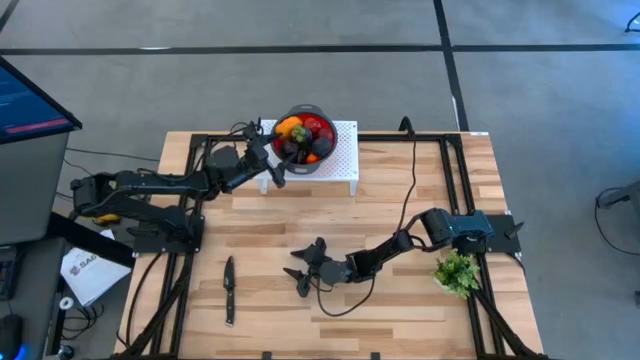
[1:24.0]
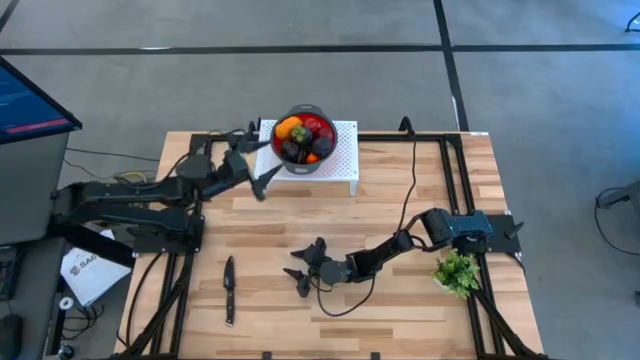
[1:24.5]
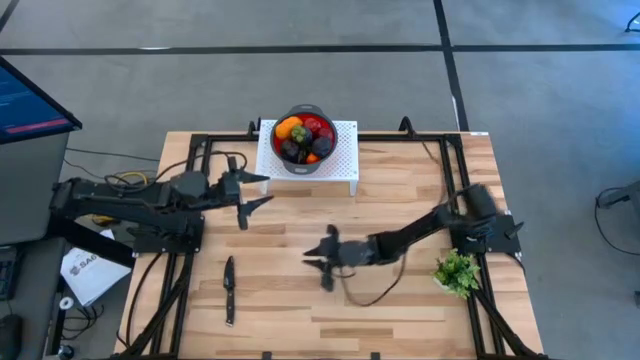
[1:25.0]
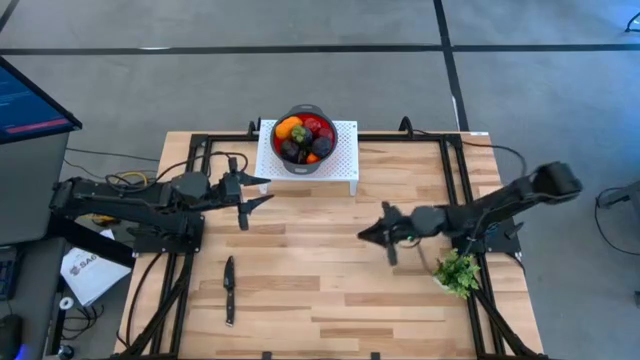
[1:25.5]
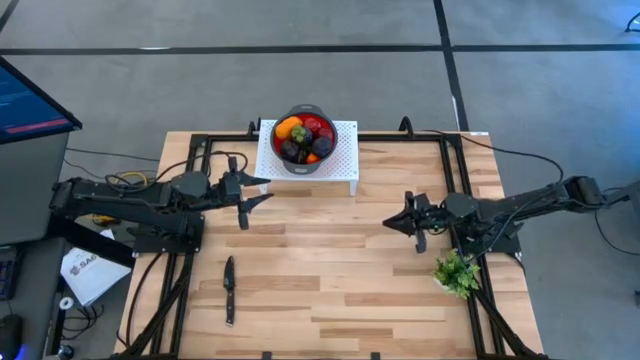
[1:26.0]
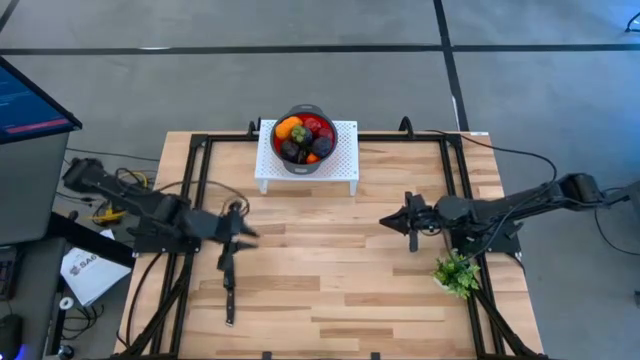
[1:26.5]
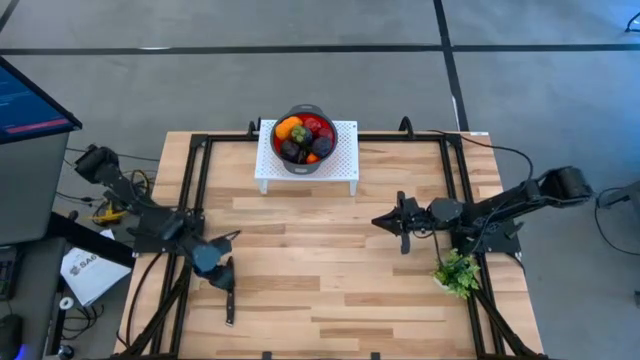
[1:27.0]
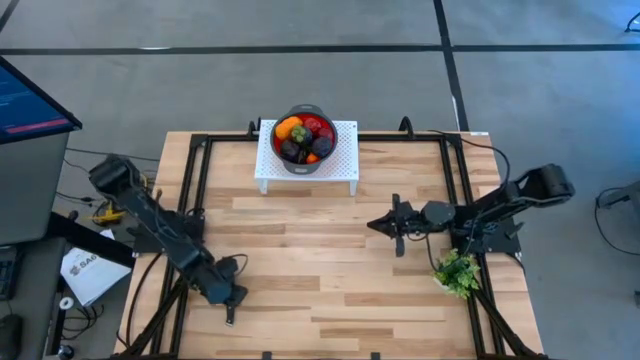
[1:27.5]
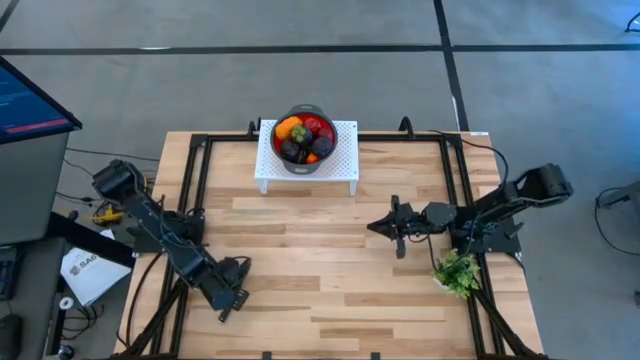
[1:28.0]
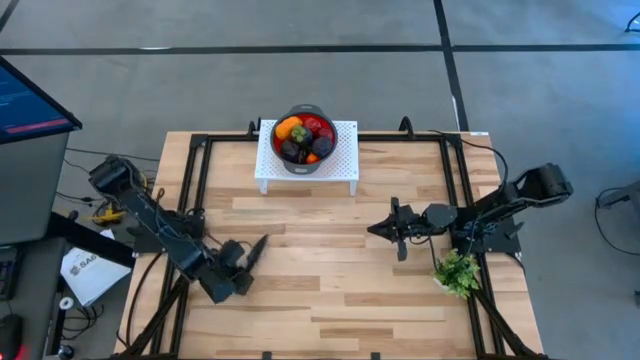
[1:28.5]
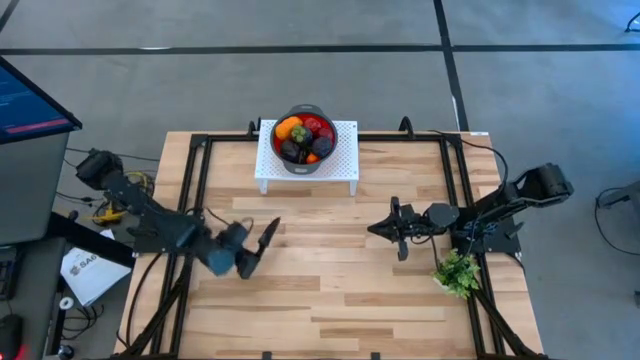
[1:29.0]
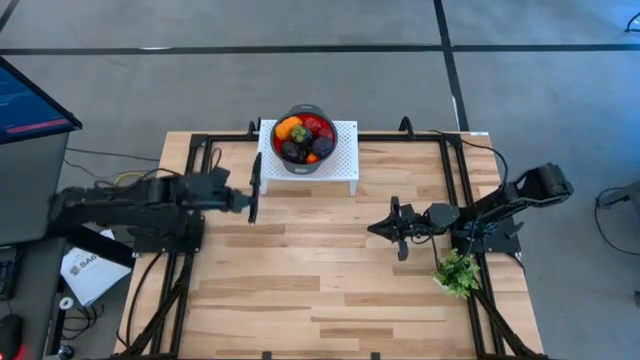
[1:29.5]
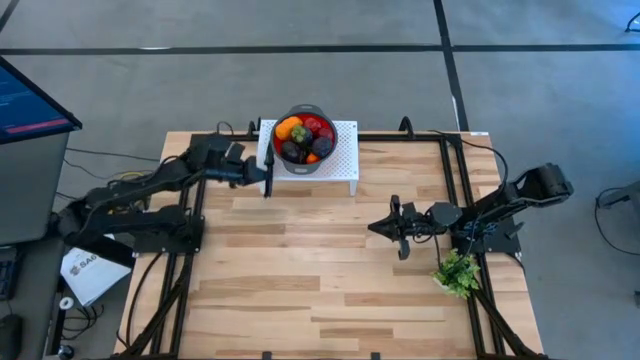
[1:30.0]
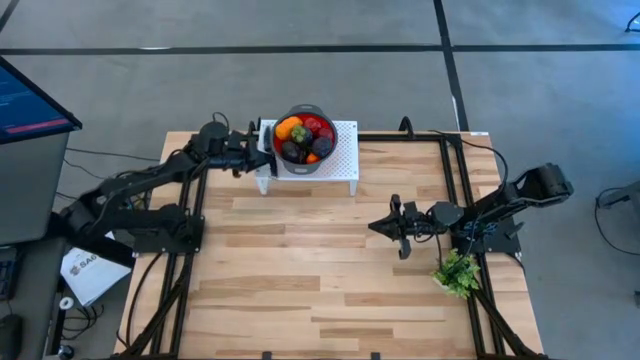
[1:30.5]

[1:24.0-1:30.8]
Task: Pick & Place Fruit
Put the knife on the shelf

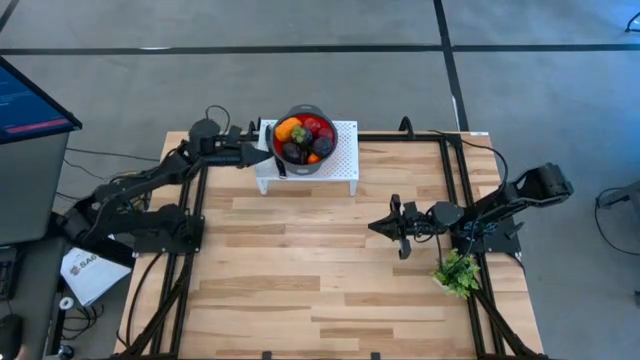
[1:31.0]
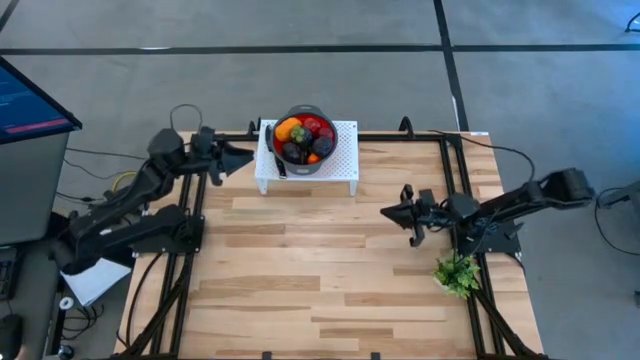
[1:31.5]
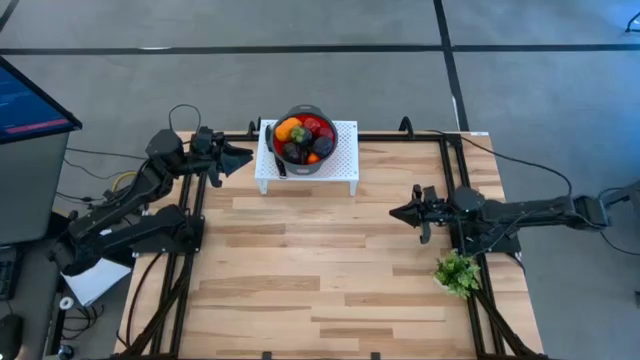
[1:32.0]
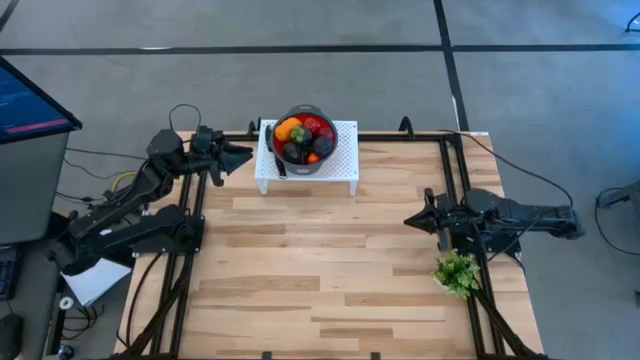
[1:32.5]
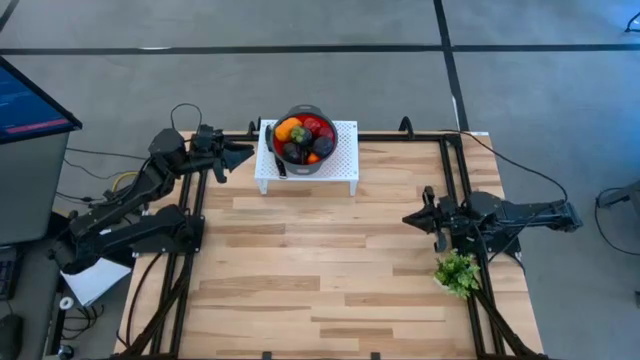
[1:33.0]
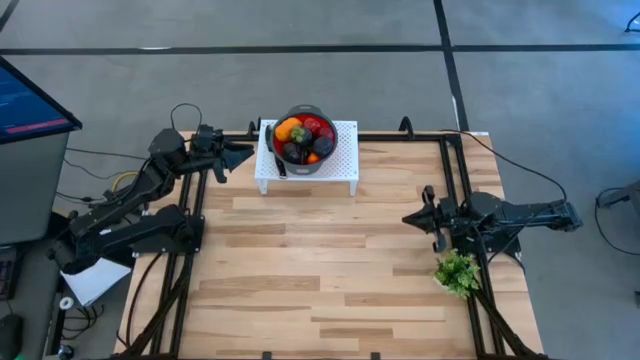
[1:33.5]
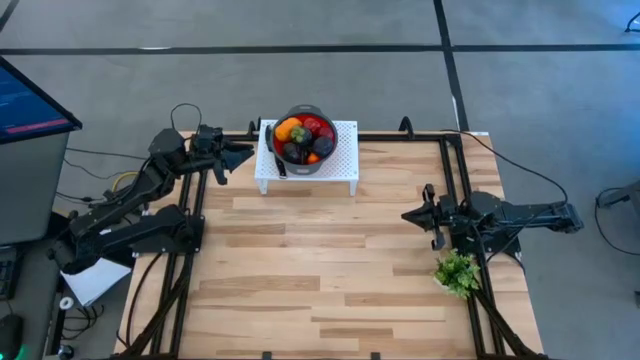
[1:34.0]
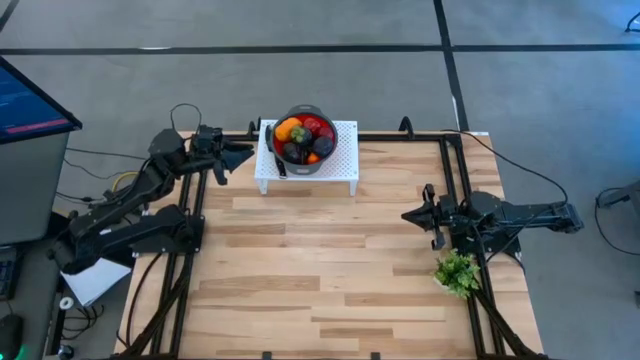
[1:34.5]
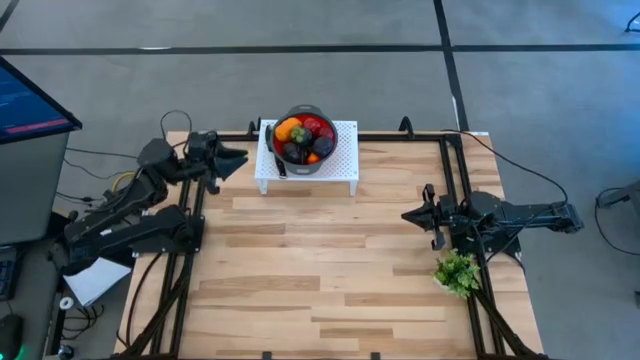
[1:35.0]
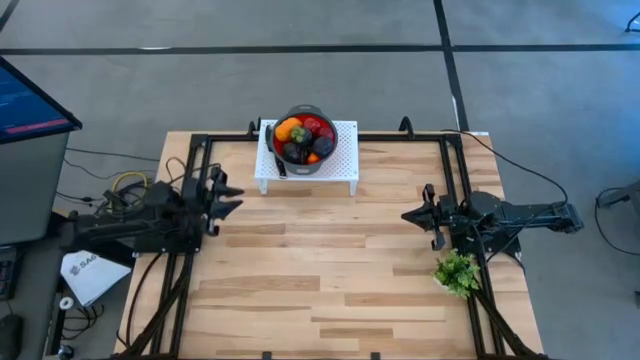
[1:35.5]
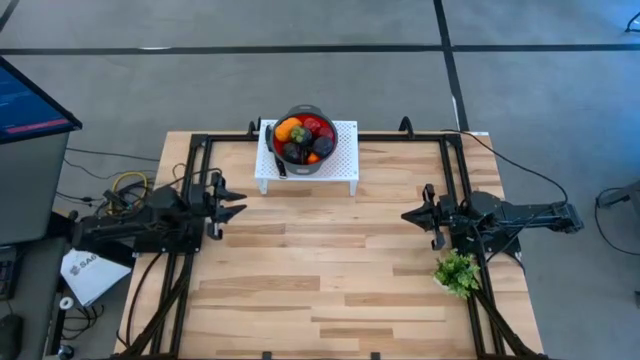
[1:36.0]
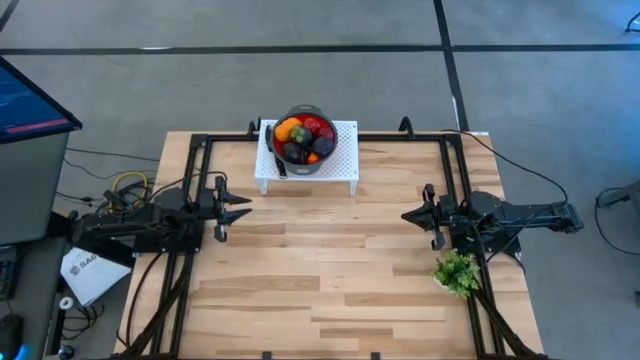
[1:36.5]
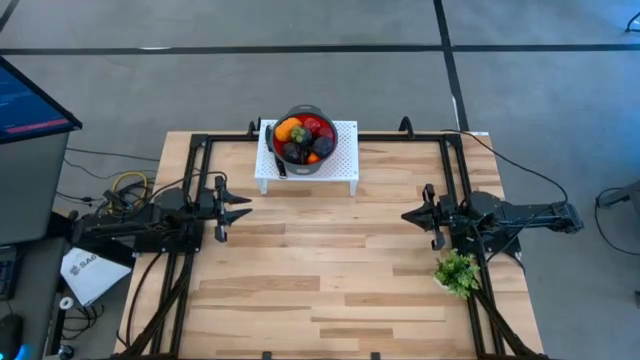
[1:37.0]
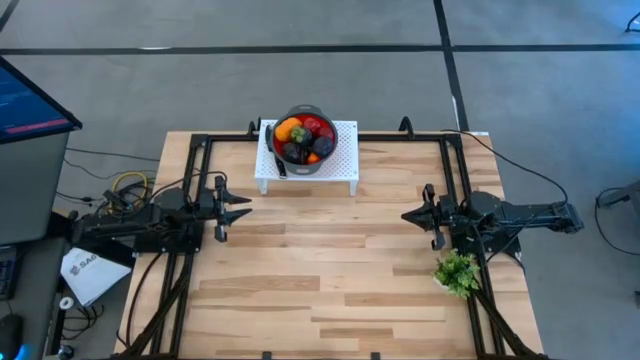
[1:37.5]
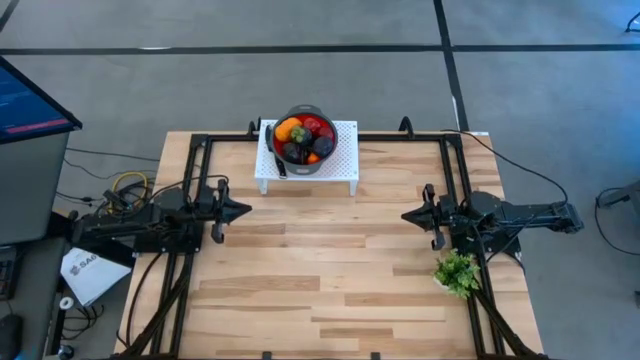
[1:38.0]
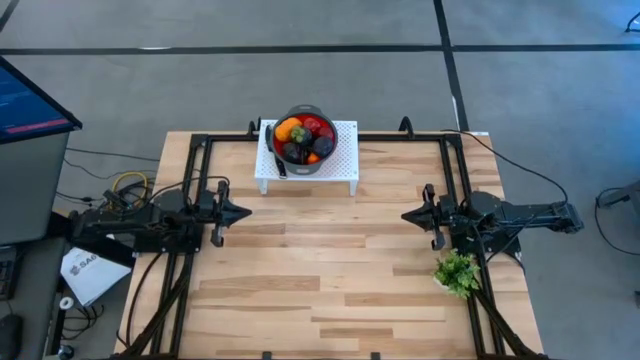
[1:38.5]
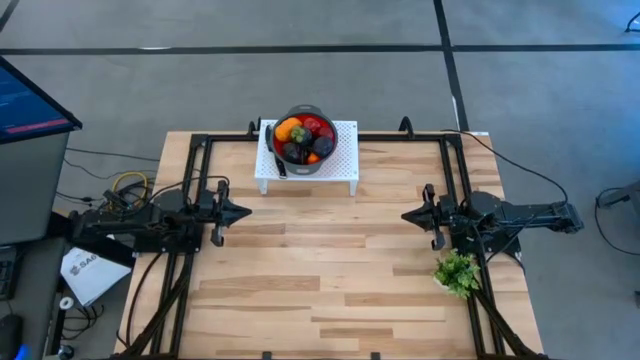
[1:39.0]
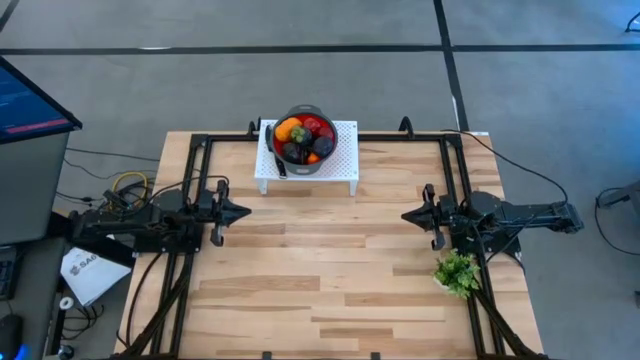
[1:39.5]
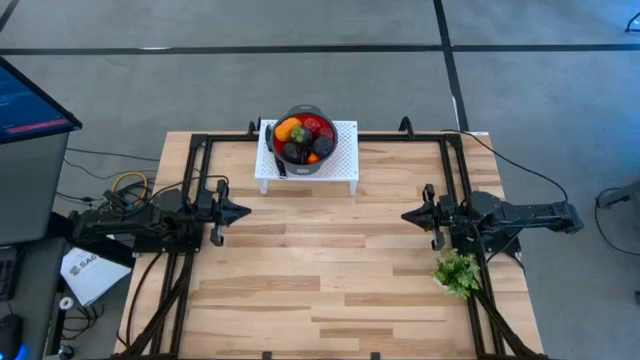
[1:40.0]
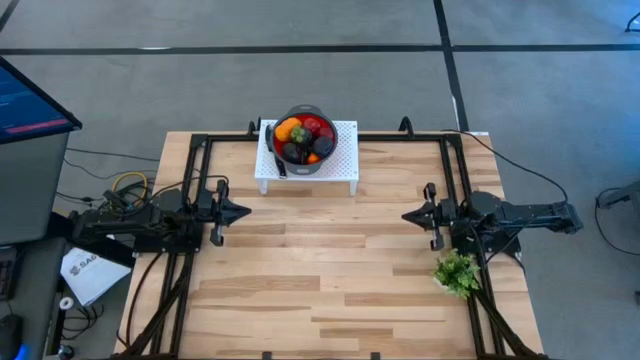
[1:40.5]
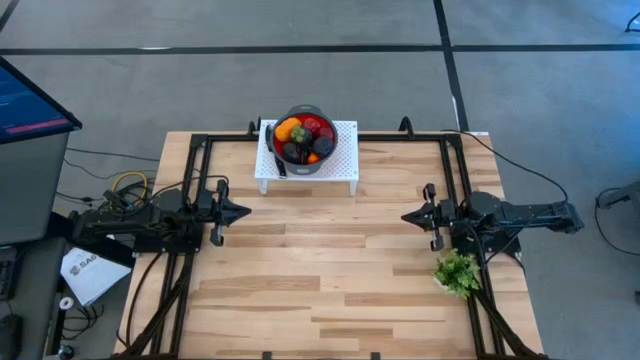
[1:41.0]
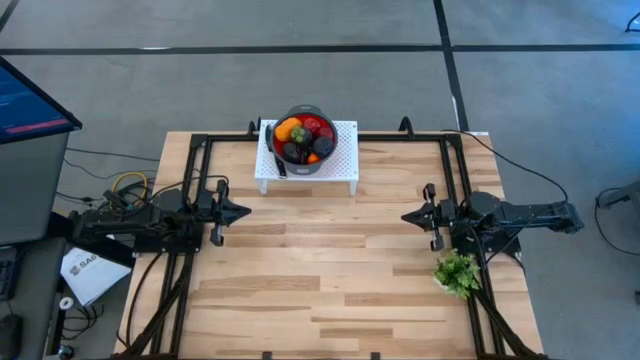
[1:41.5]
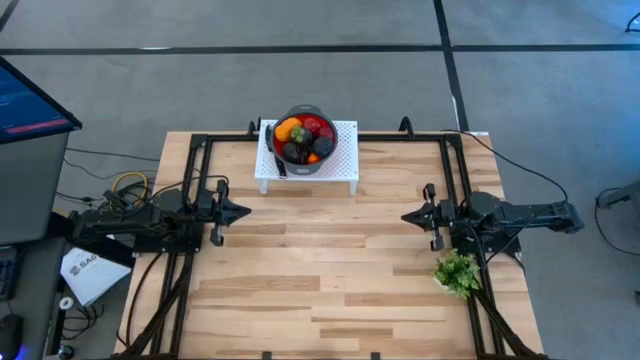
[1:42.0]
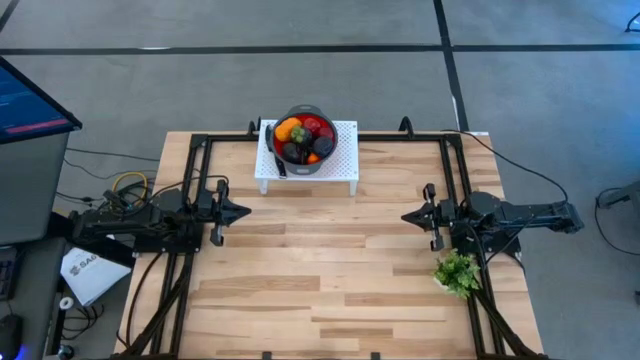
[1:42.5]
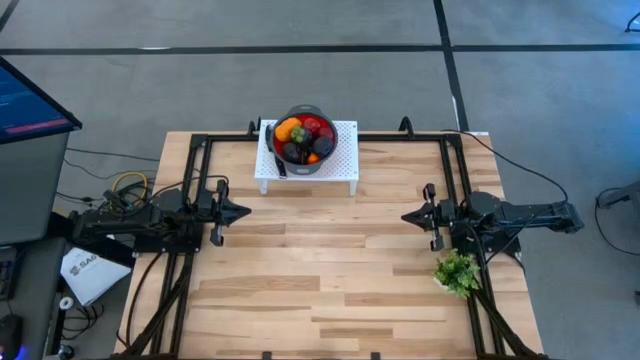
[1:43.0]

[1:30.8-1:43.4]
Return to Home Position

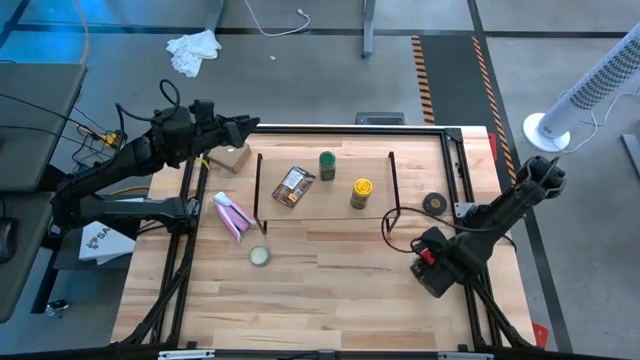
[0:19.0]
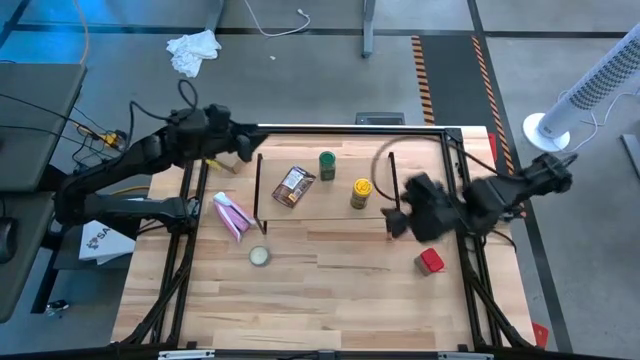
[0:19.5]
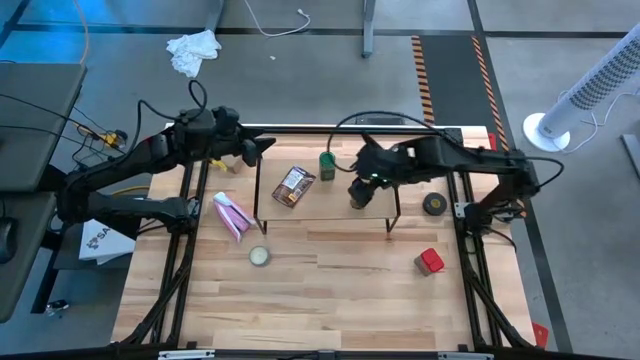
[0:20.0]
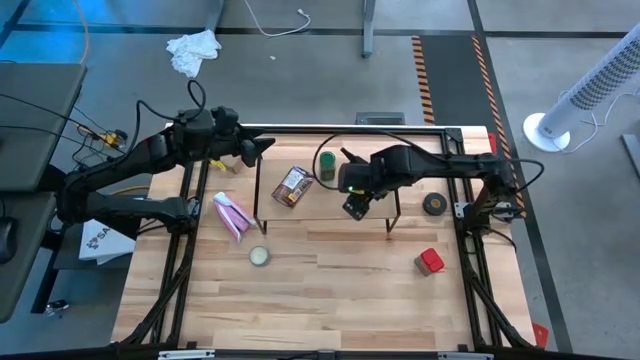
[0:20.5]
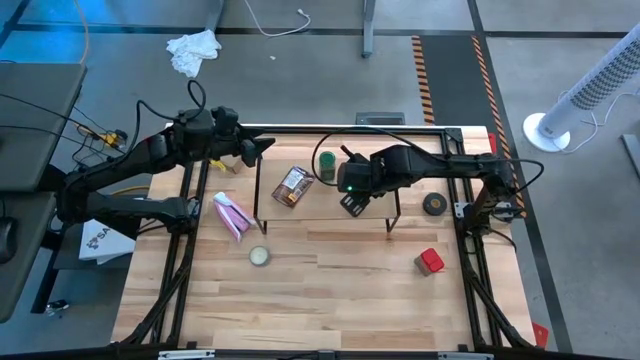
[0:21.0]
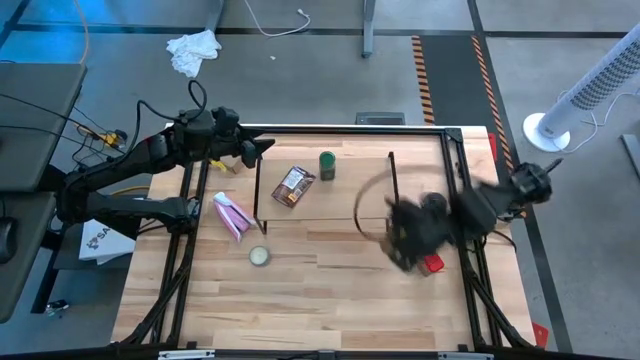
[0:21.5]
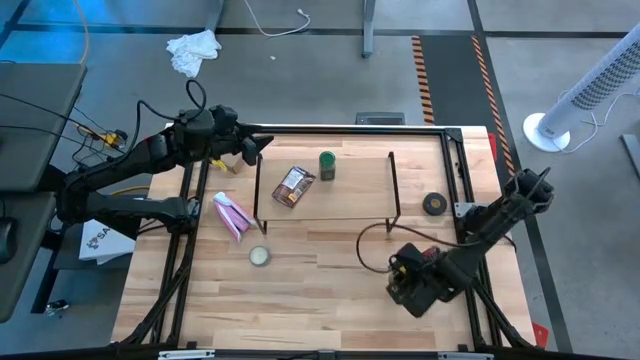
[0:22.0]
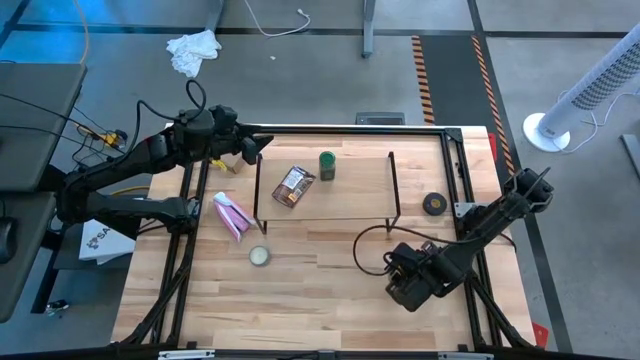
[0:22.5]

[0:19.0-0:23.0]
Task: Shelf spices
Remove the yellow spice bottle from the shelf
